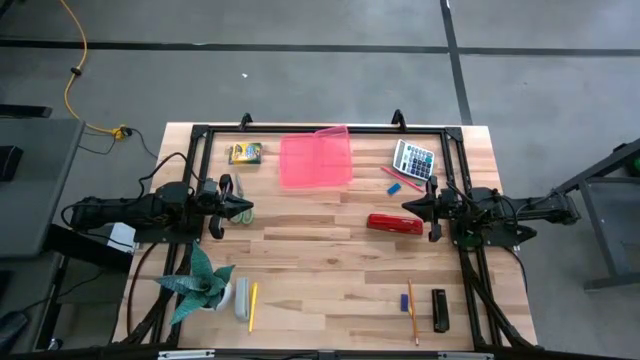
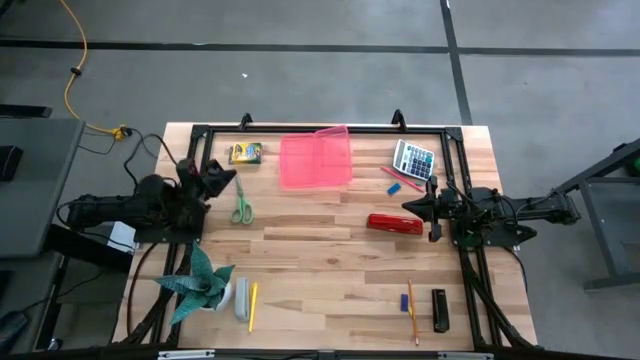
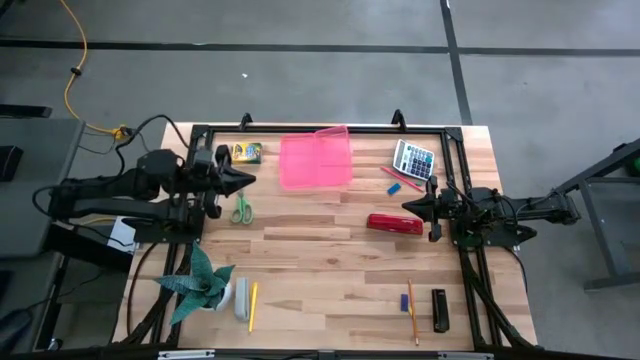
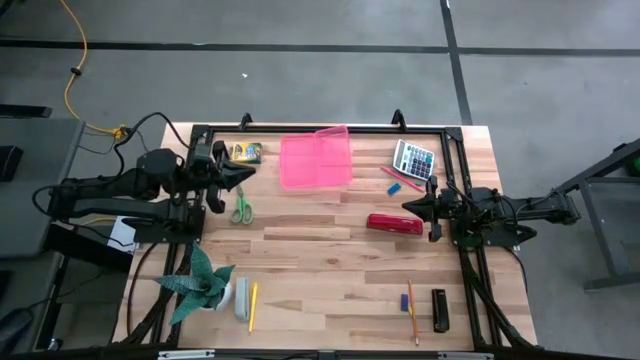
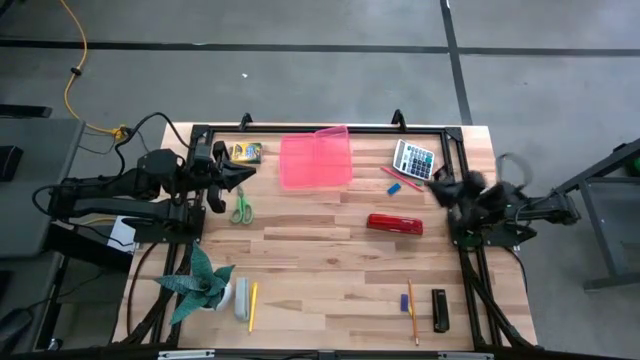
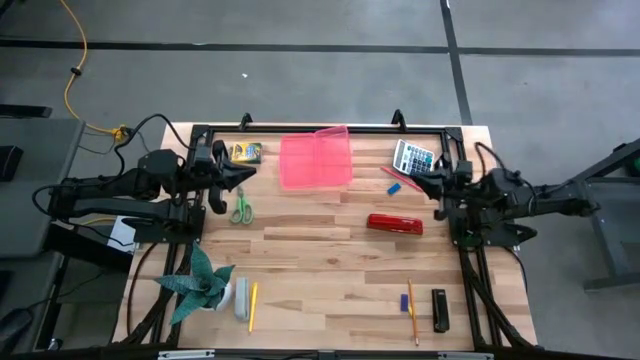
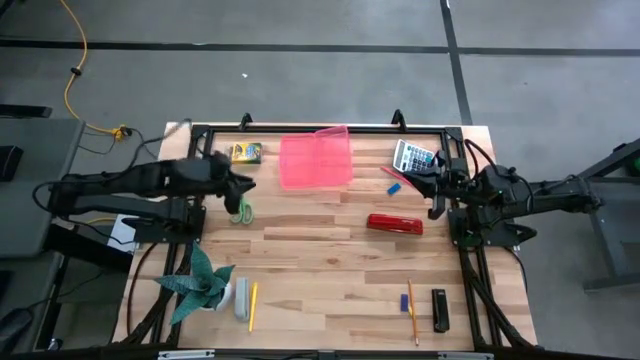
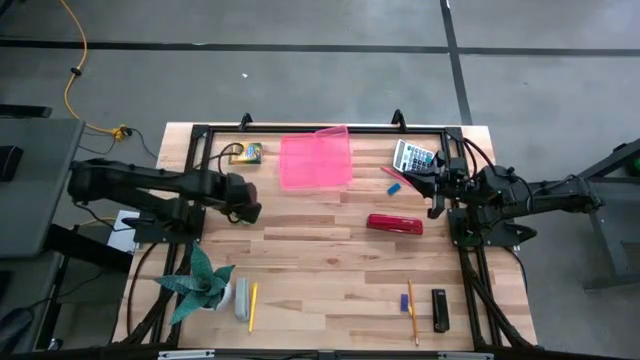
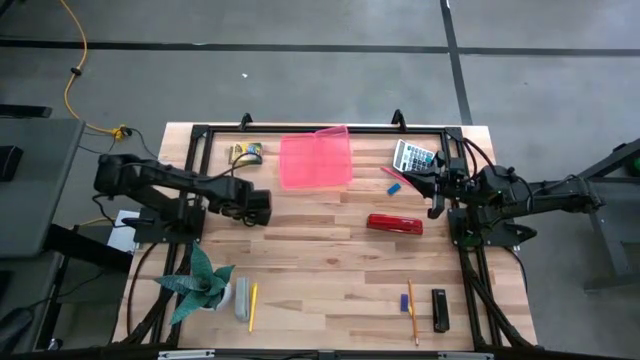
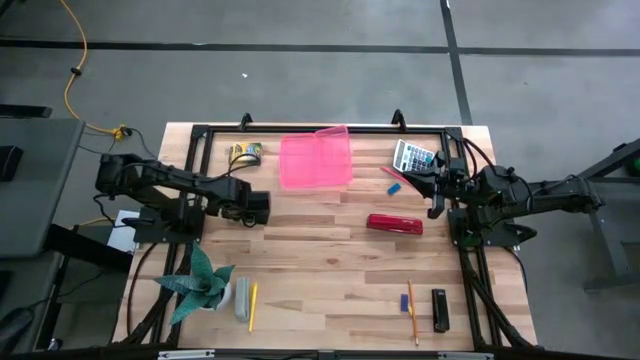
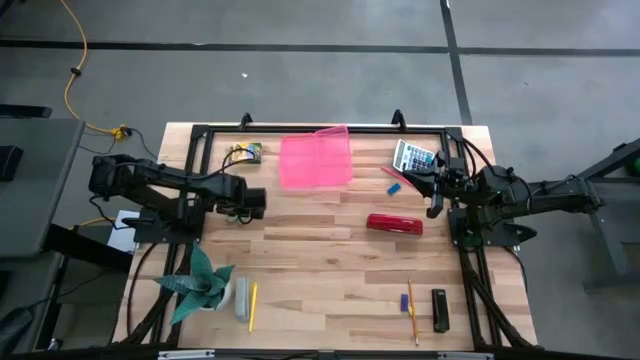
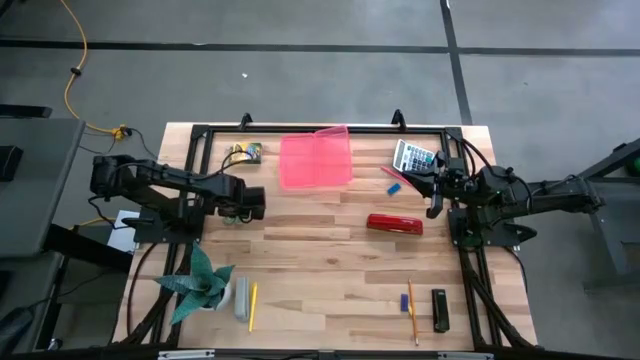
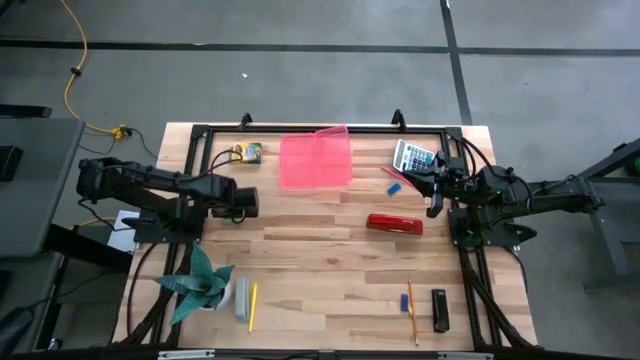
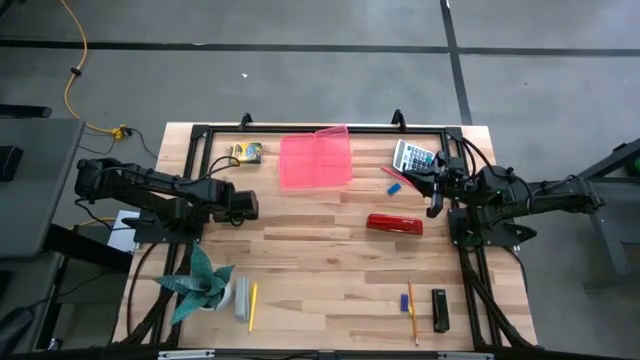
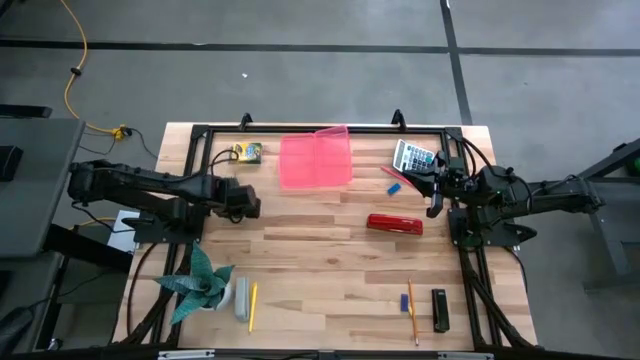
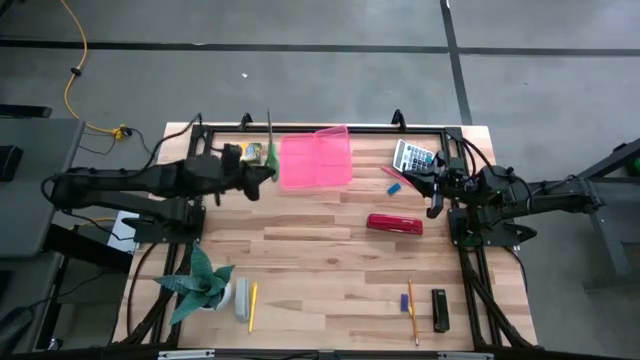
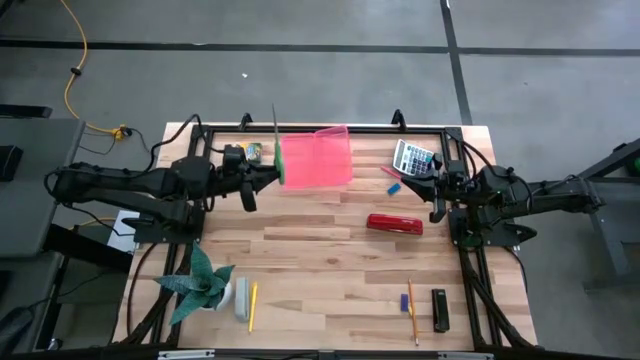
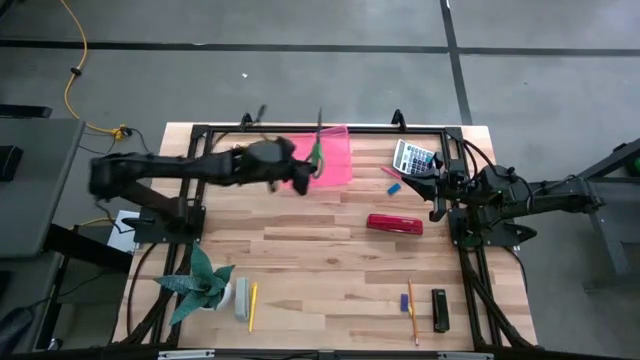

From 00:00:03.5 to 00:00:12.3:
Task: Pack school essentials
Put the green scissors into the pink supply box

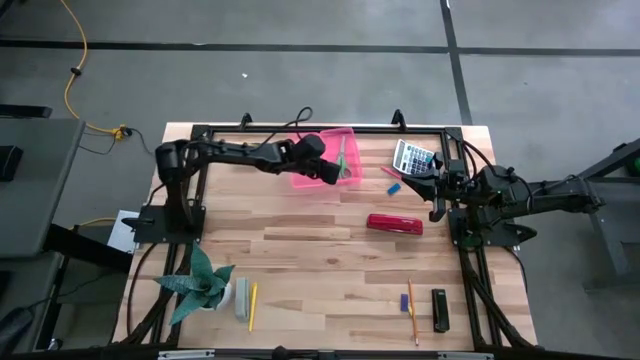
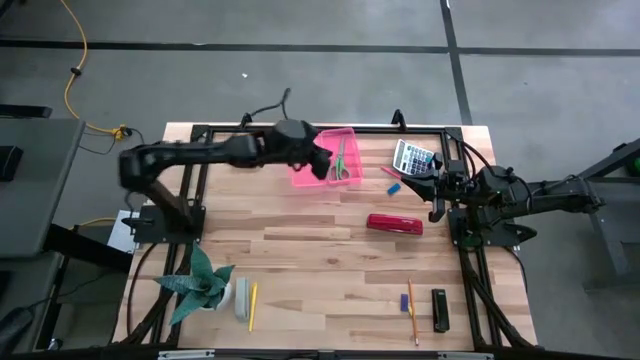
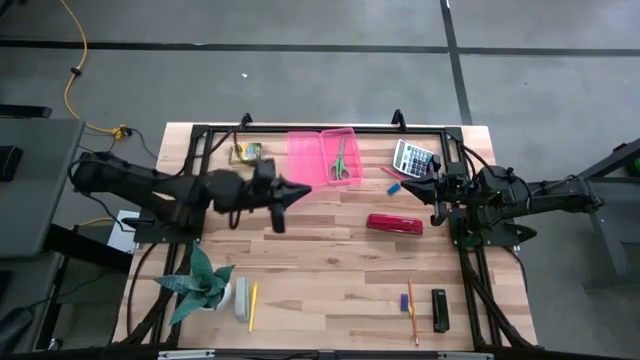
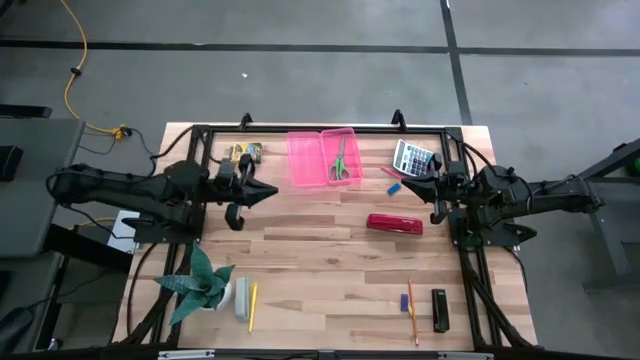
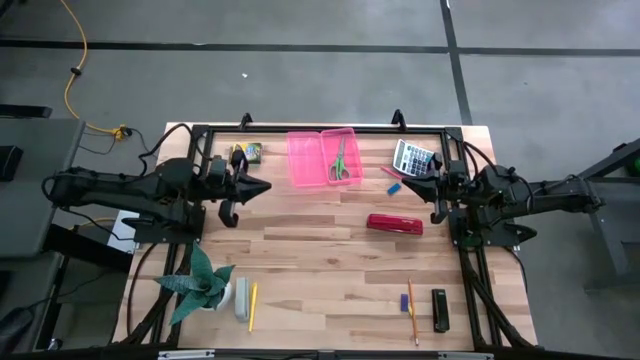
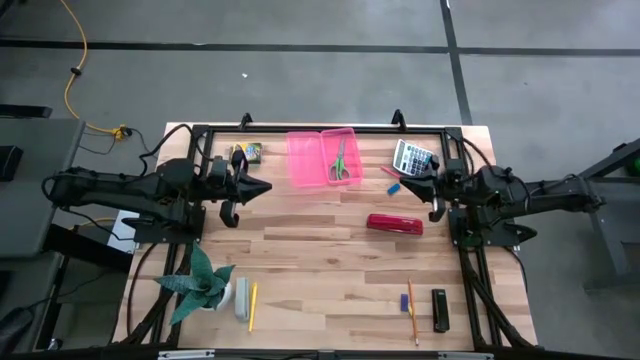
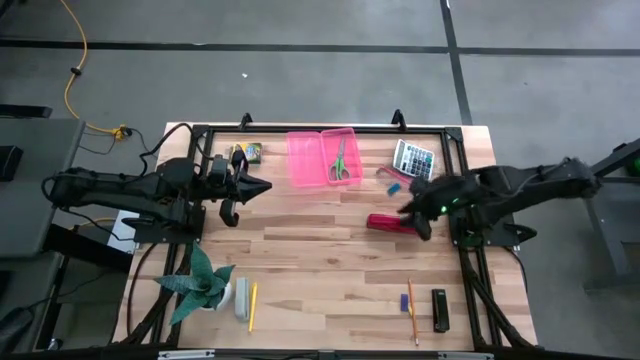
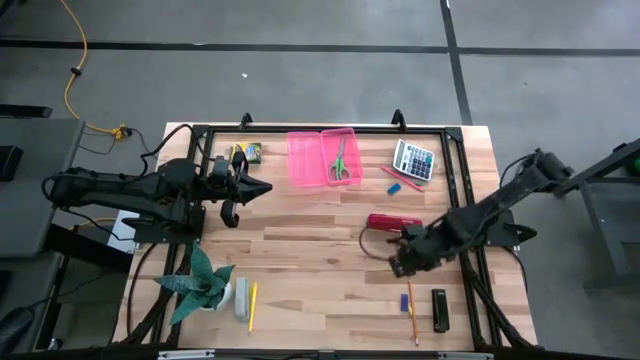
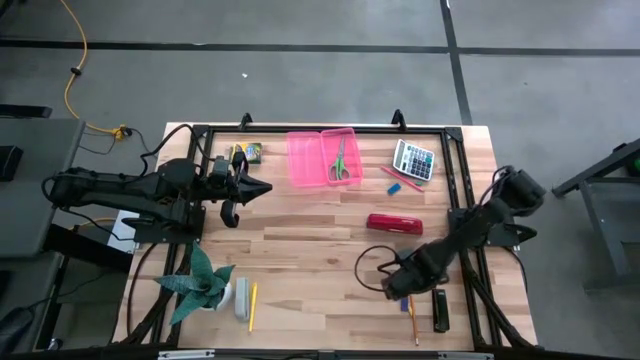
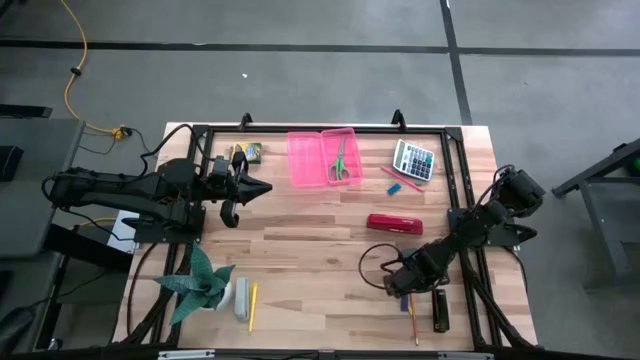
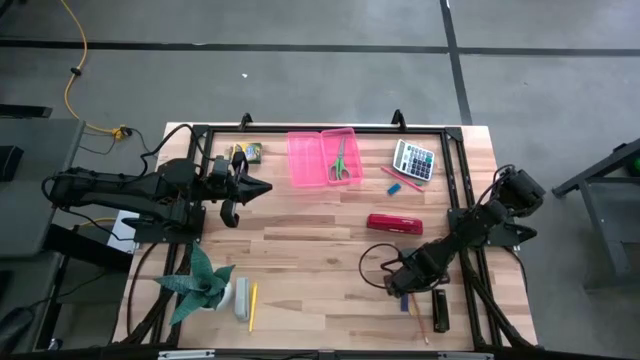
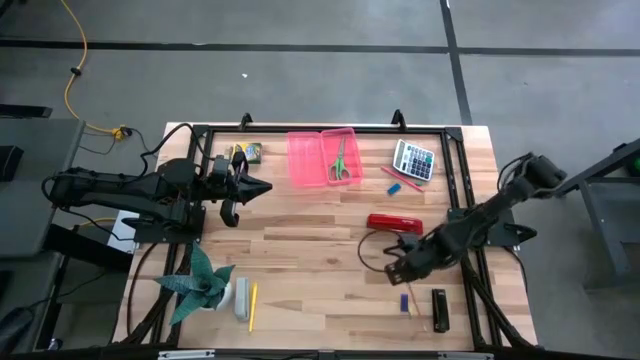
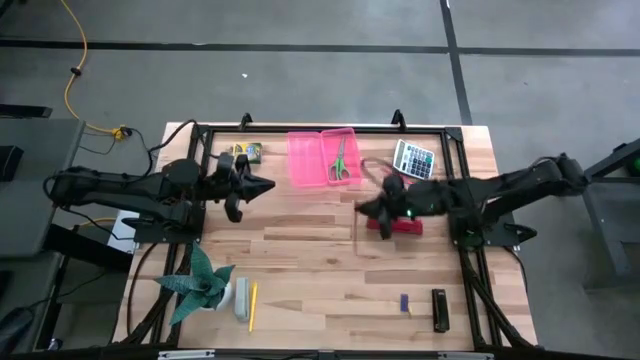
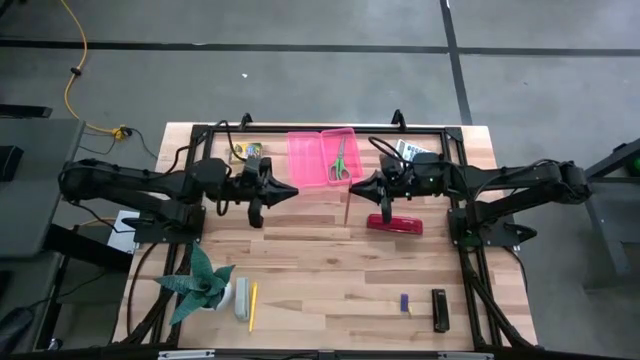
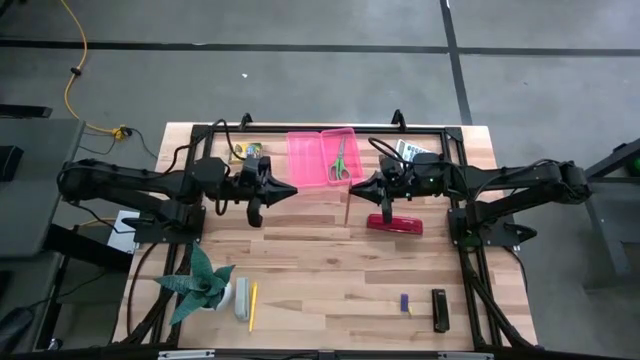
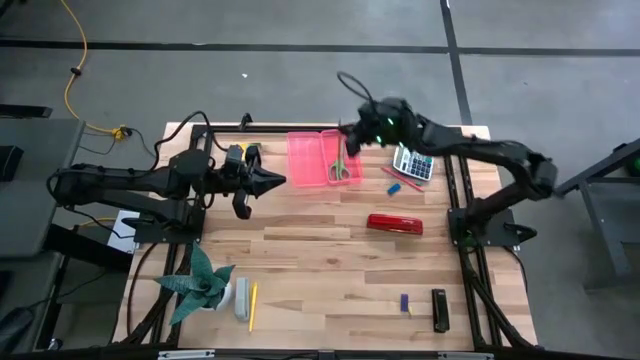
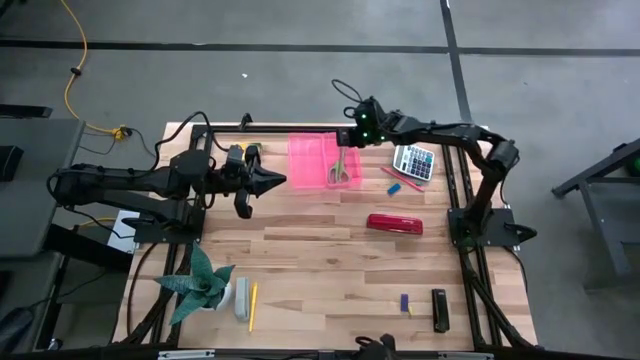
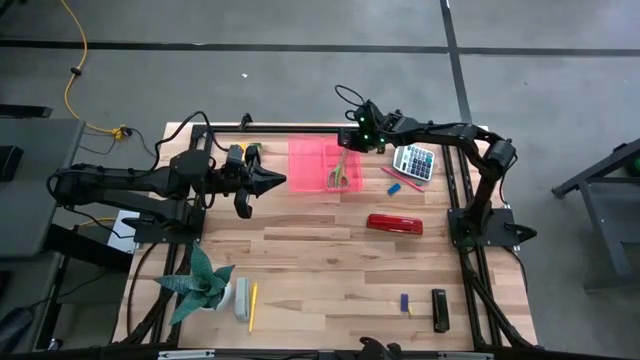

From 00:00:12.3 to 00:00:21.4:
Put the orange pencil into the pink supply box

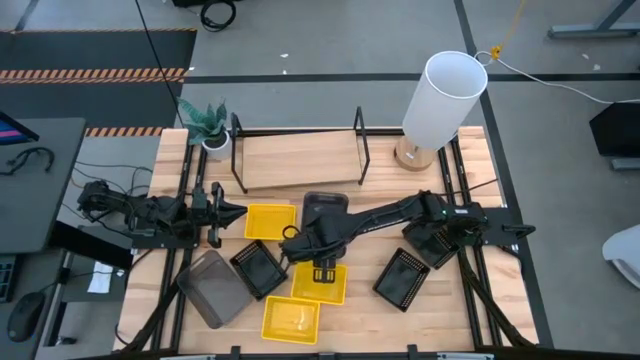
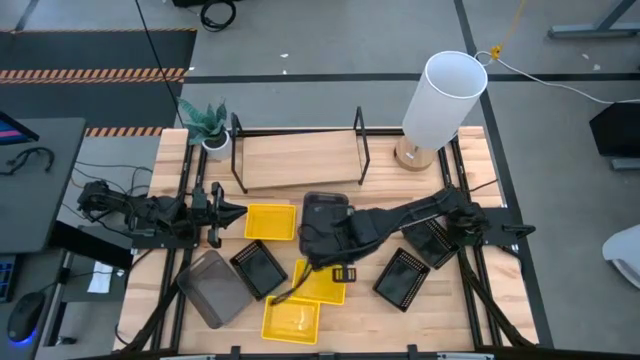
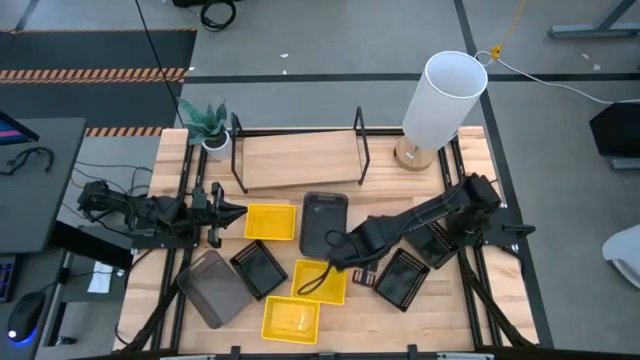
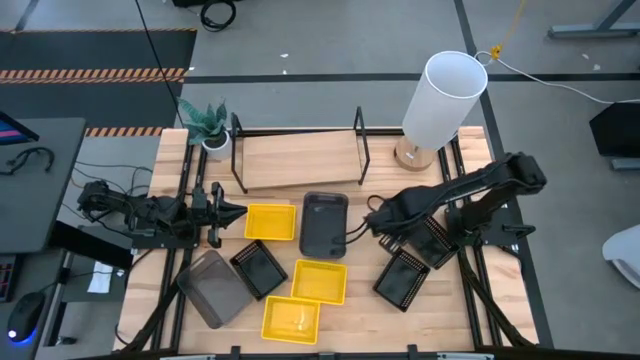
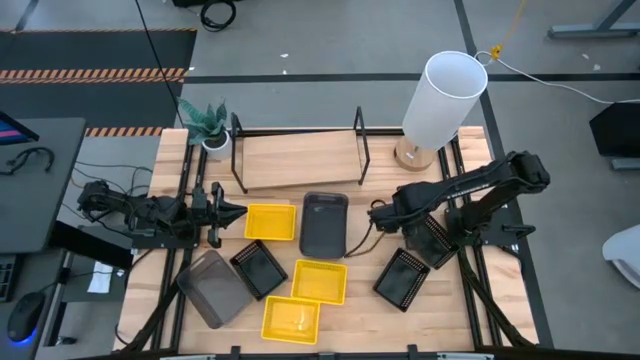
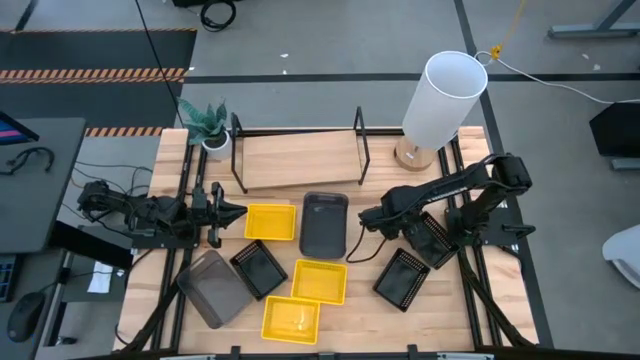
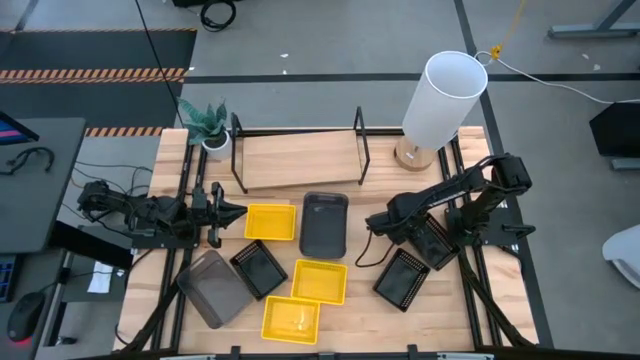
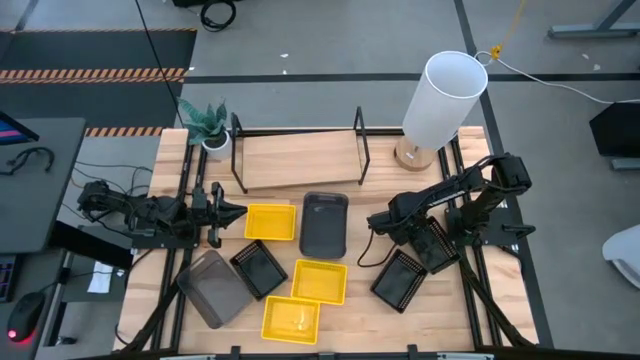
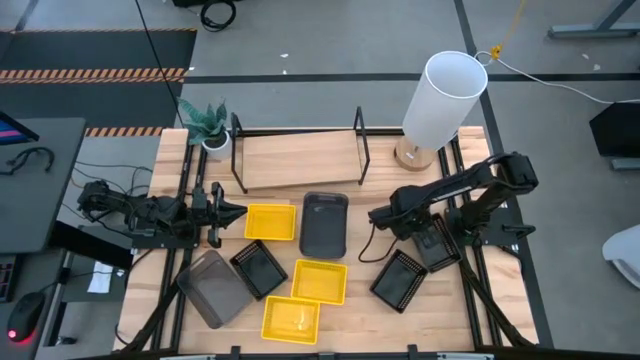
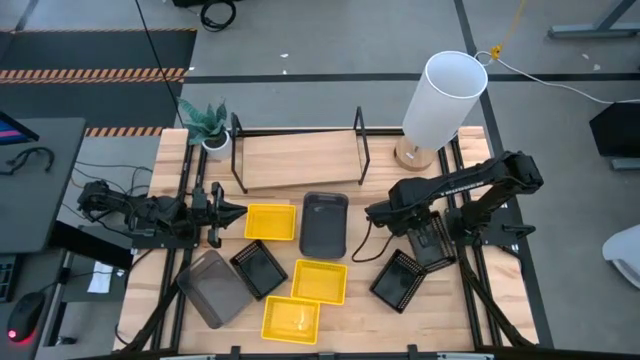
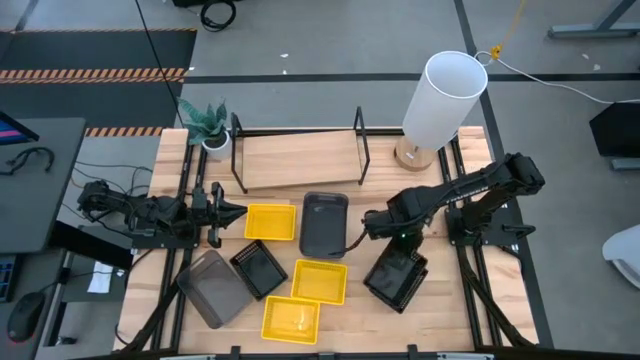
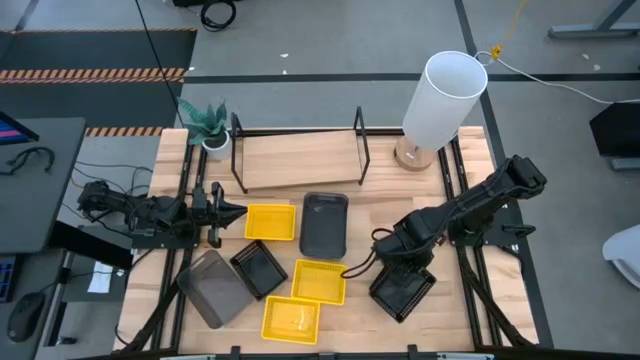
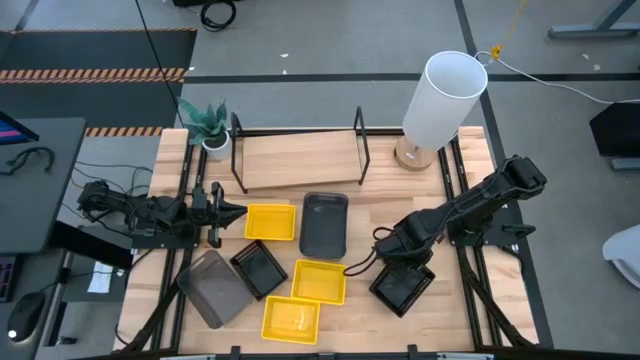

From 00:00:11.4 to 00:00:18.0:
Task: Stack baskets on shelf by color
Stack the top black bin on the bottom right black bin
